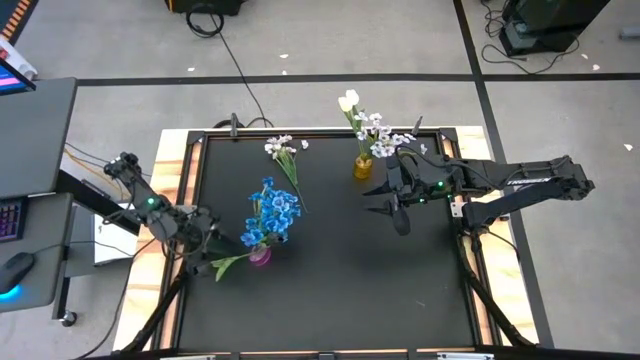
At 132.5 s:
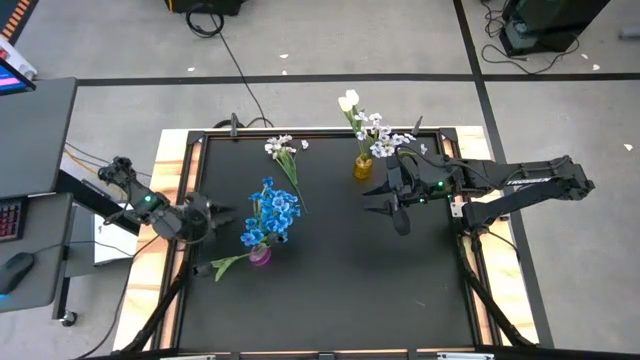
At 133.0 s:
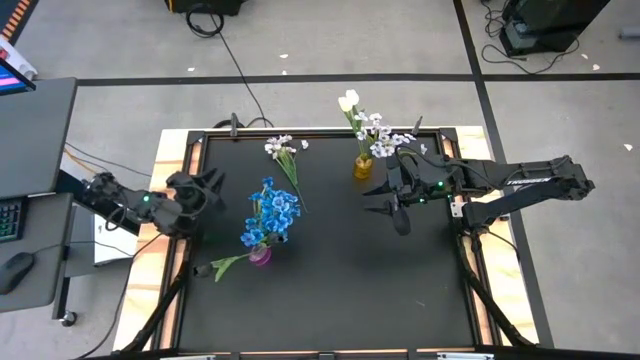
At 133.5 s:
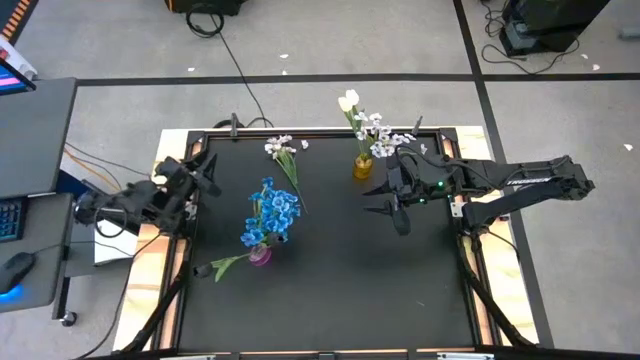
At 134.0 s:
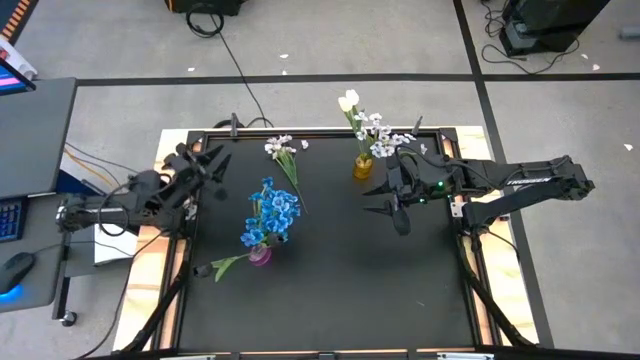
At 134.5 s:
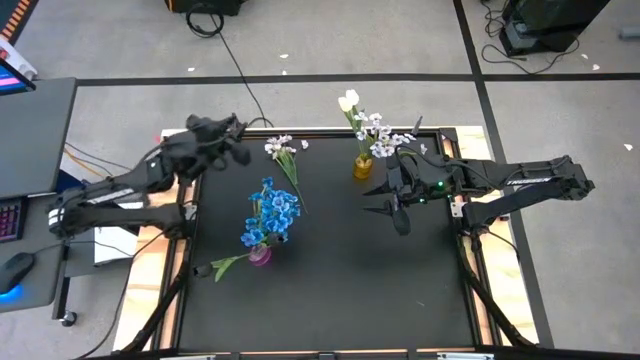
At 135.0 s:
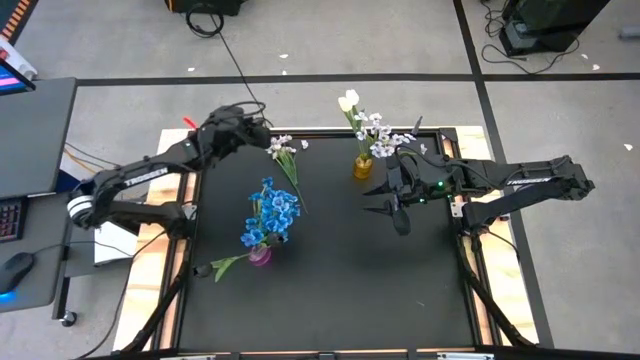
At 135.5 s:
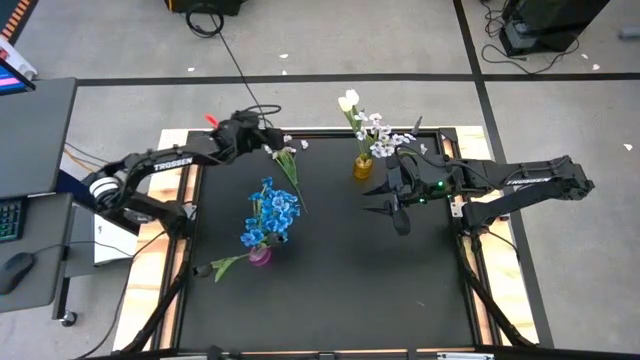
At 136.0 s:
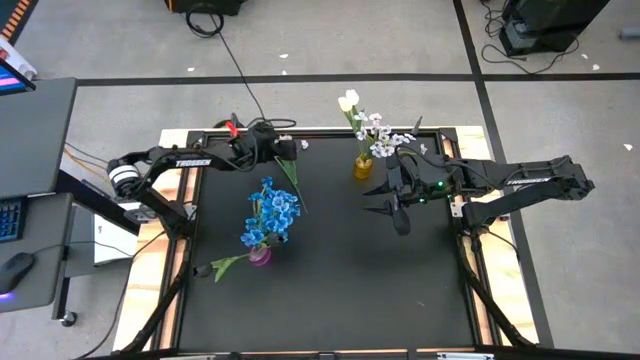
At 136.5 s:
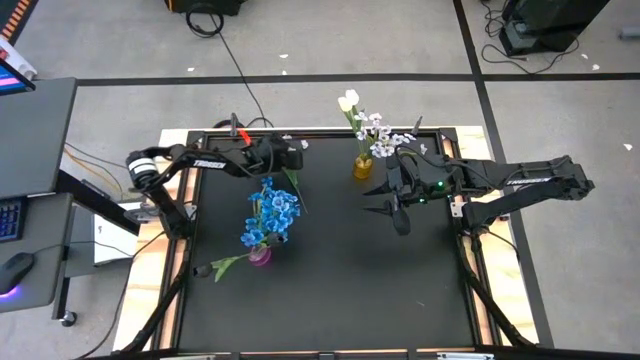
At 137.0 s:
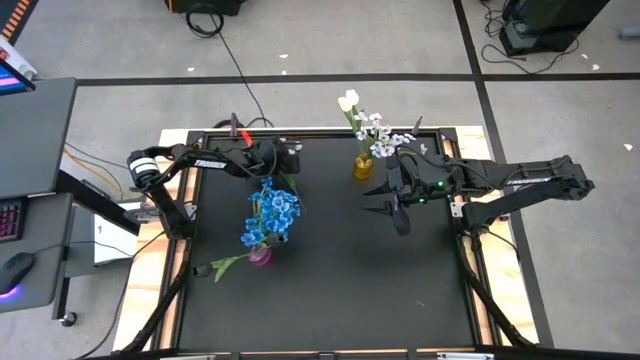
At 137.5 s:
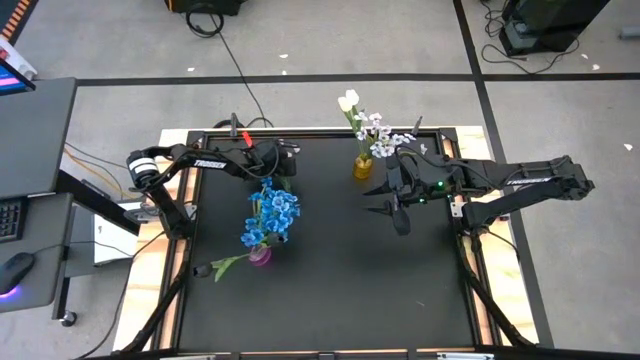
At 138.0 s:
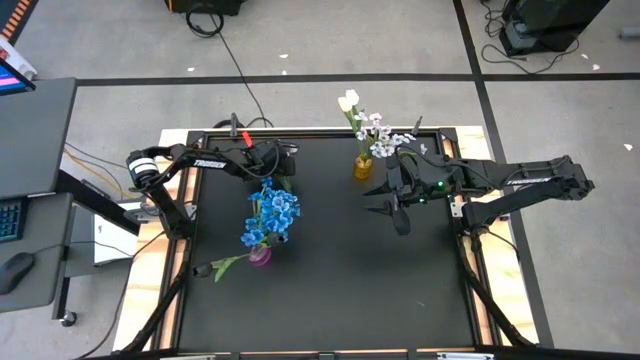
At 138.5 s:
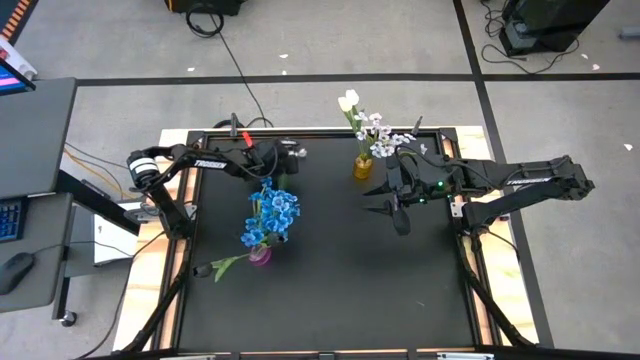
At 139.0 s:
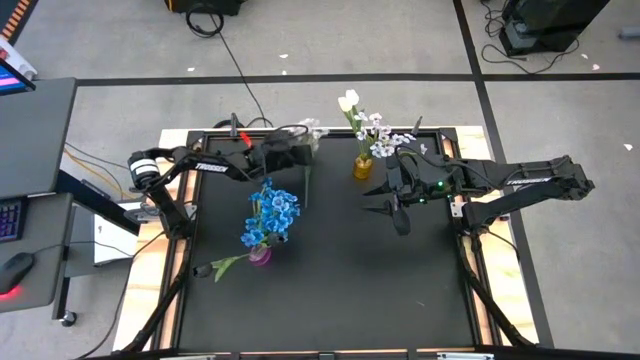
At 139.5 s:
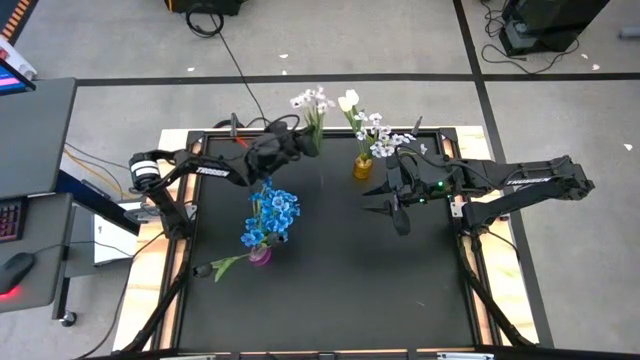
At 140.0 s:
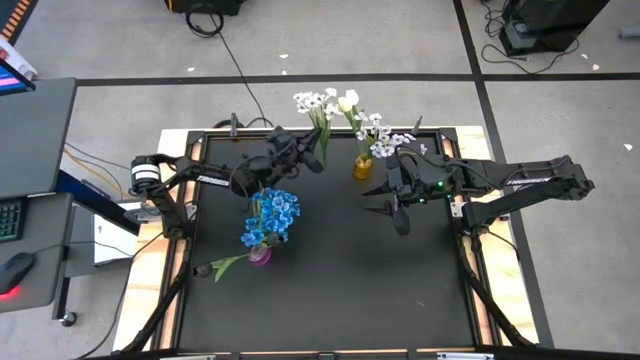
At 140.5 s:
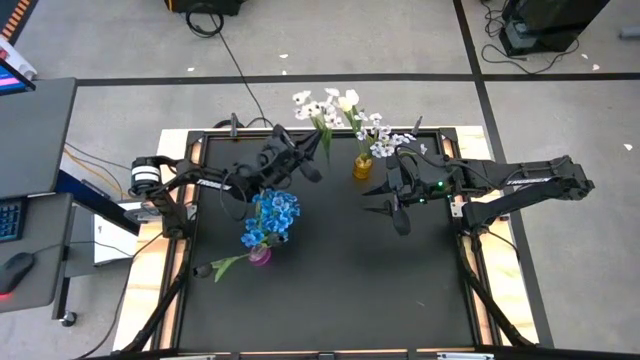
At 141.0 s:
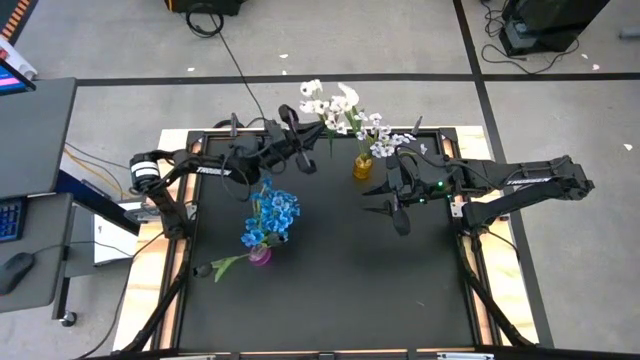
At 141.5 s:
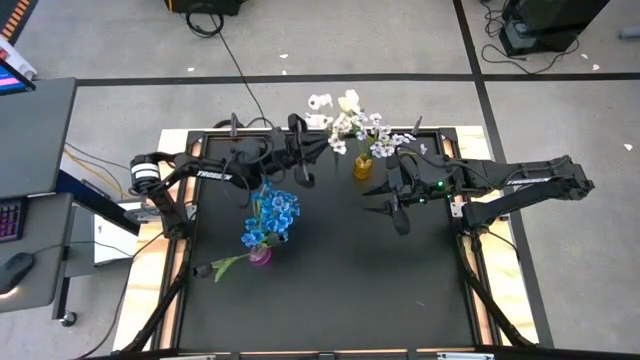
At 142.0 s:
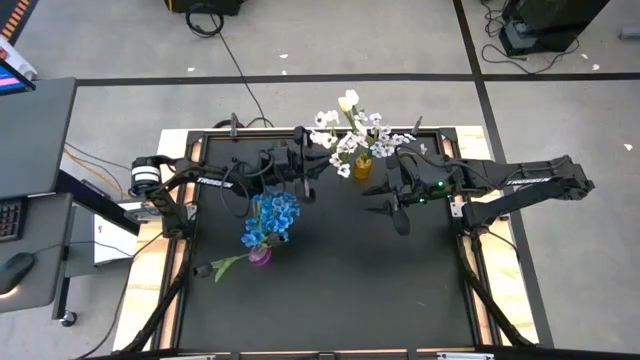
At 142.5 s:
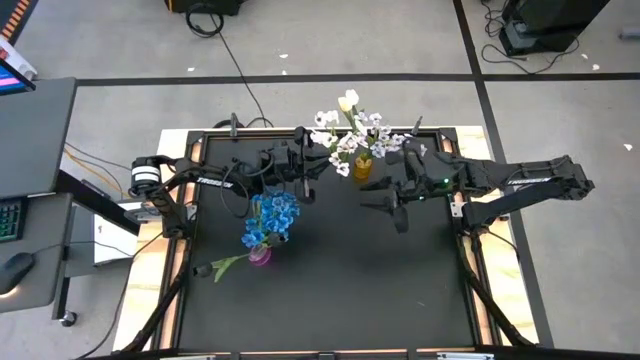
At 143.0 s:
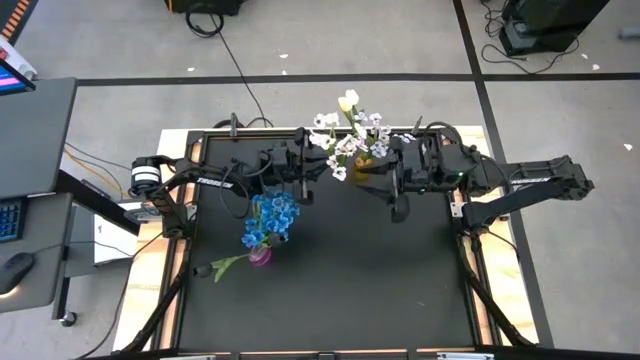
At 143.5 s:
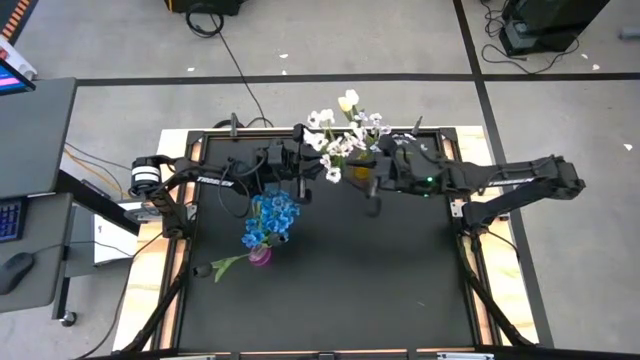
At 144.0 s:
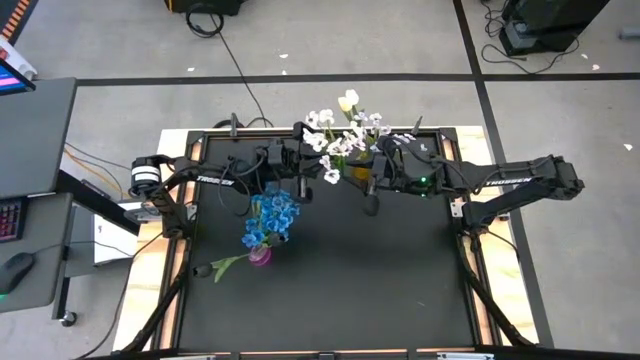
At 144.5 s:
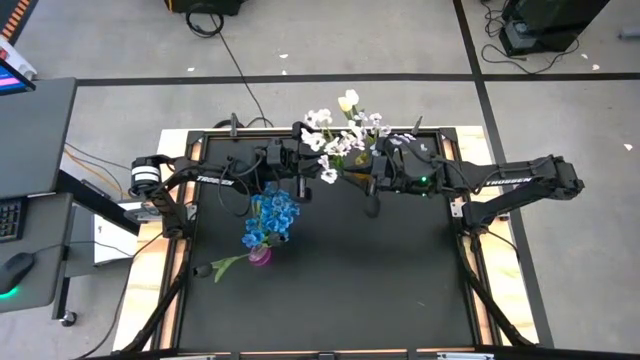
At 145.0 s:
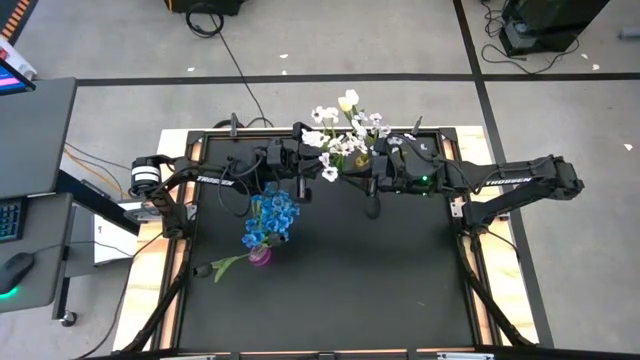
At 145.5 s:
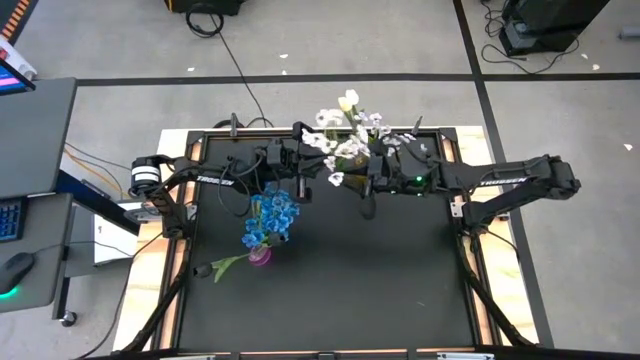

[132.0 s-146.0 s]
Task: Sort flowers into vase by color
Put the white flowers into the yellow vase
